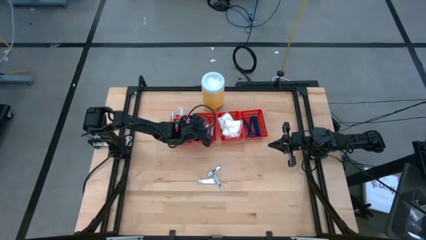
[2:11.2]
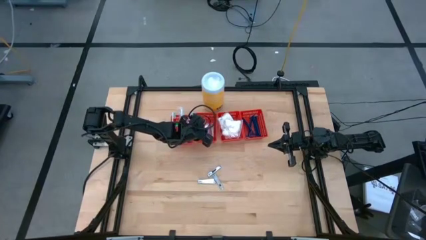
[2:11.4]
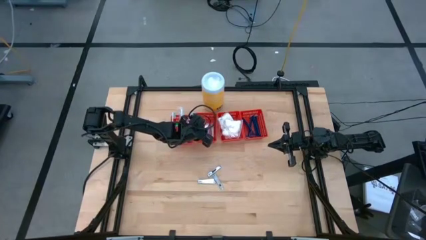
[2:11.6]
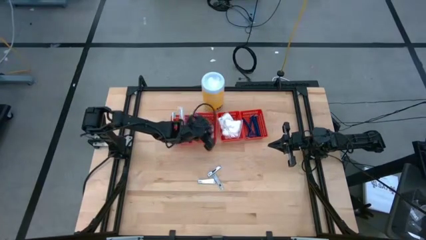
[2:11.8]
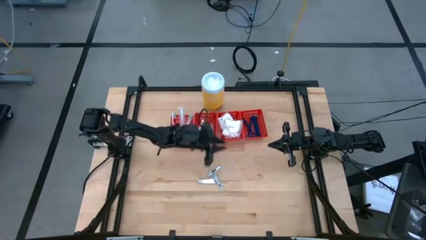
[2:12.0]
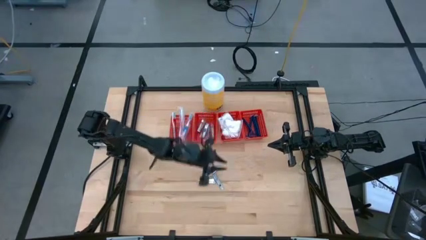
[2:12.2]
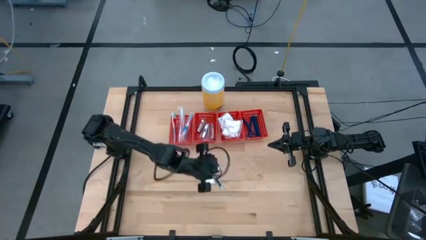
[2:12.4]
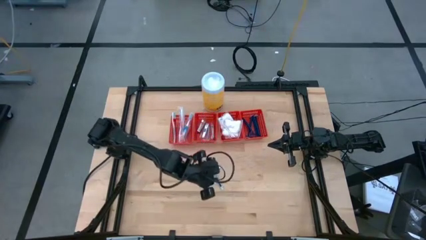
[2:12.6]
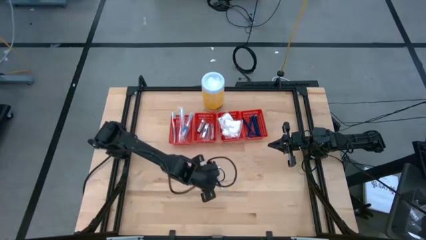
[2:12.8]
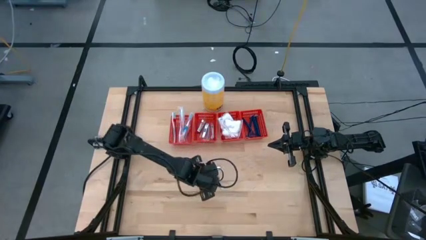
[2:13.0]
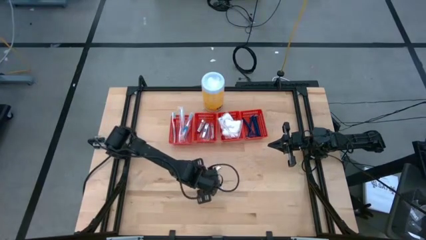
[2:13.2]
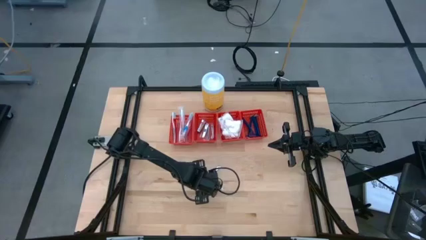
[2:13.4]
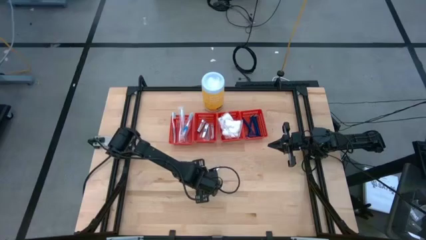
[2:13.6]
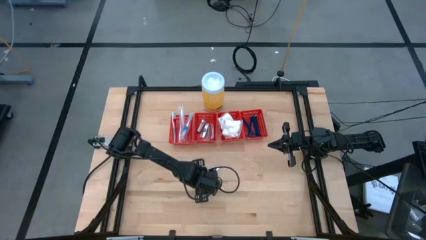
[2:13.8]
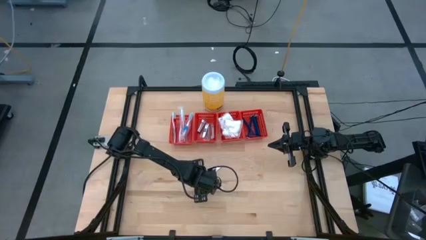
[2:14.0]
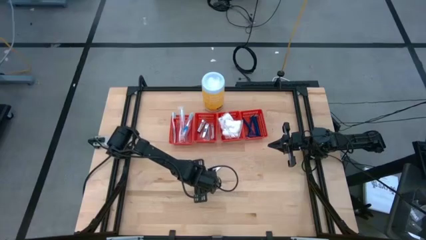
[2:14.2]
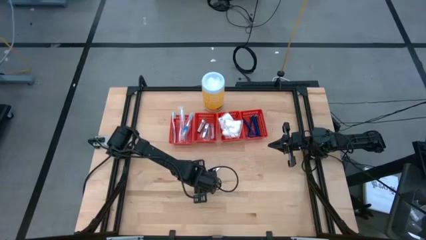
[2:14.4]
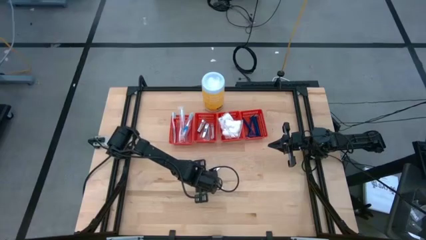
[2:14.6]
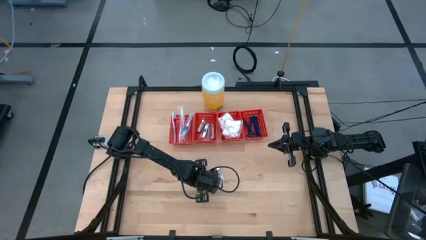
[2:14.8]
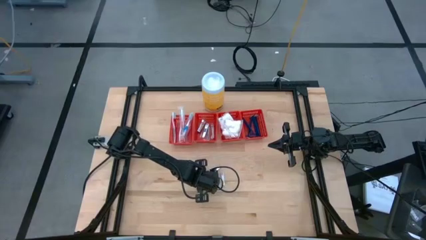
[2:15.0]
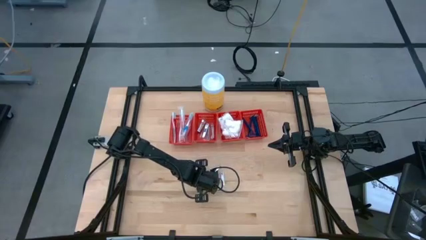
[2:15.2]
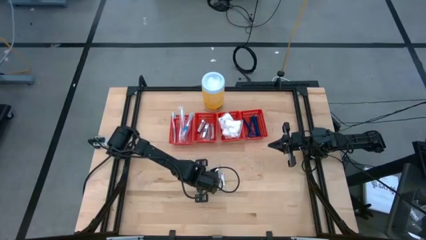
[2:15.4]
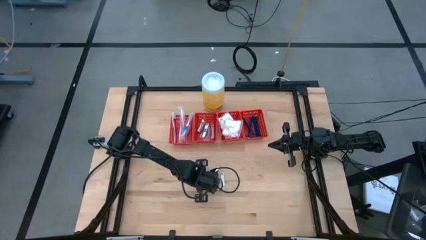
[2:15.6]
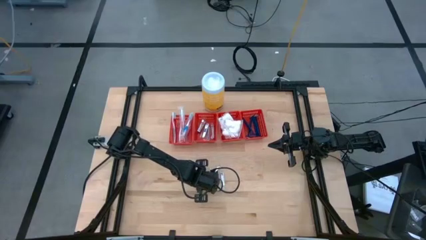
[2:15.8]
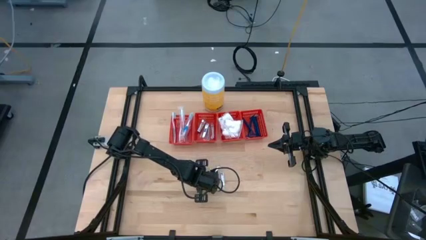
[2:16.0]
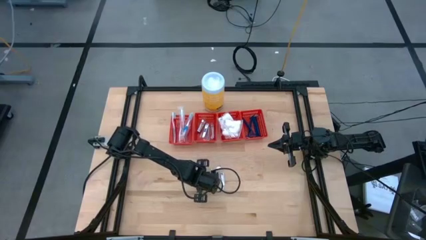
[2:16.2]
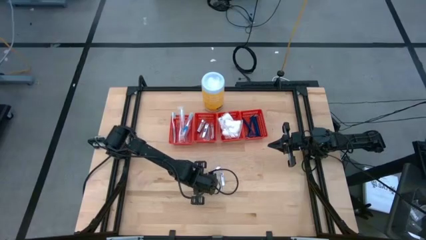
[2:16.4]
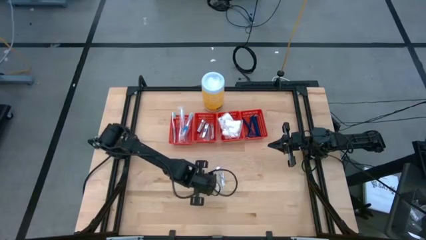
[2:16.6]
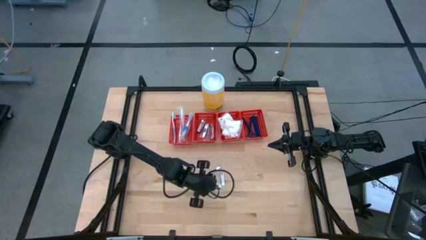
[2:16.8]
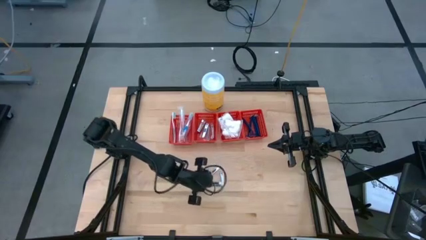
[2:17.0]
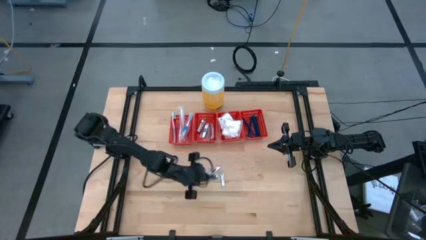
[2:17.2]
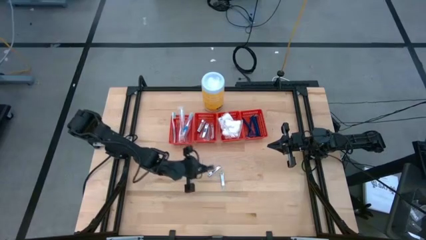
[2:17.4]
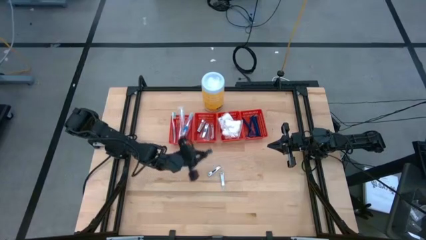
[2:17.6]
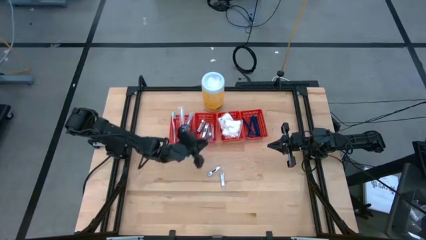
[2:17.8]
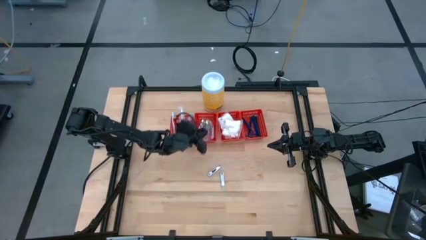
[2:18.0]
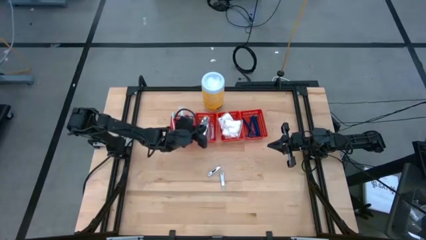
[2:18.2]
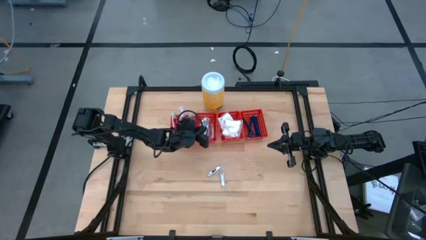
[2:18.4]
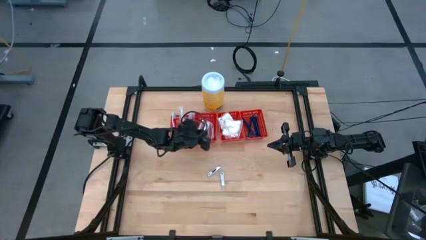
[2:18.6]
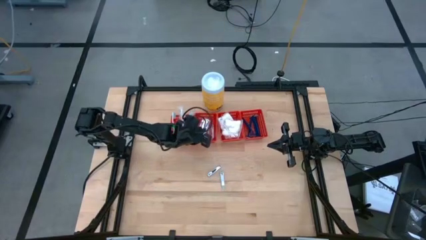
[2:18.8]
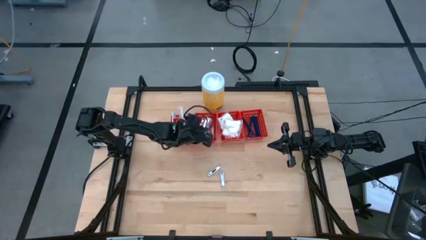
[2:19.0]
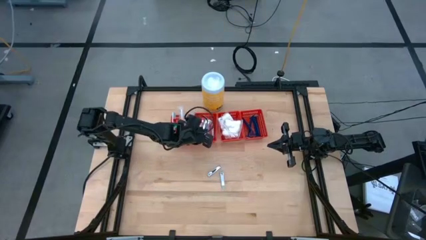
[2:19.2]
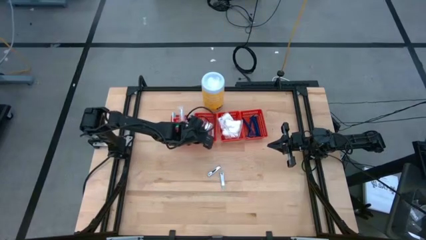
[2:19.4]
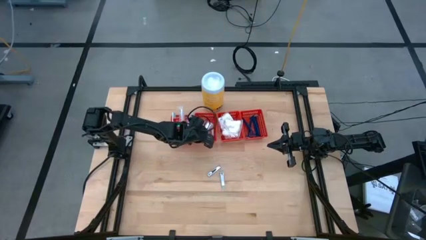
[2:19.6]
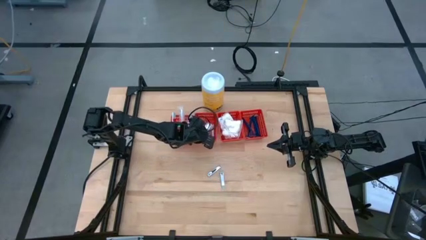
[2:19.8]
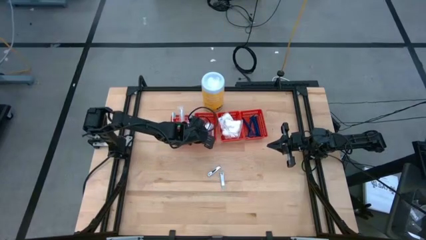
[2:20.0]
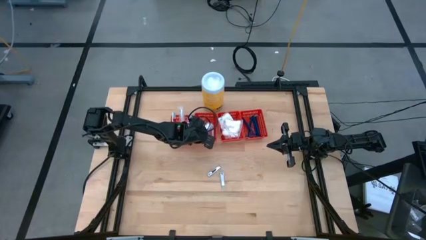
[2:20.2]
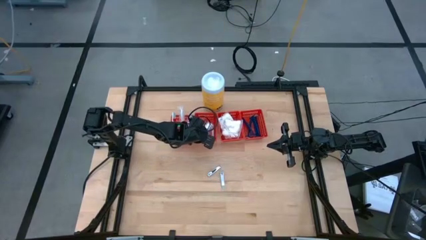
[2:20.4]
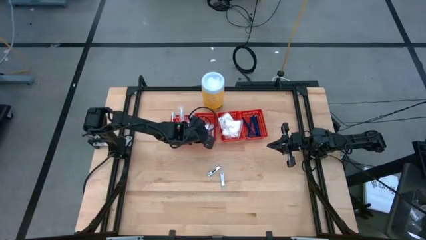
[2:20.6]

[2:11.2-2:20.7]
Task: Pick & Place Travel size toiletries
Put the silver nail clippers into the middle left red basket

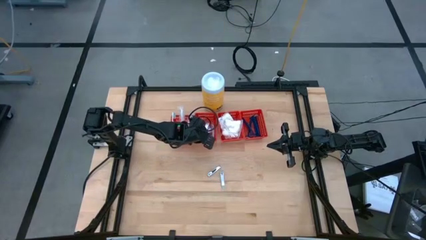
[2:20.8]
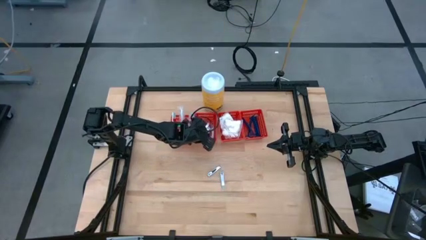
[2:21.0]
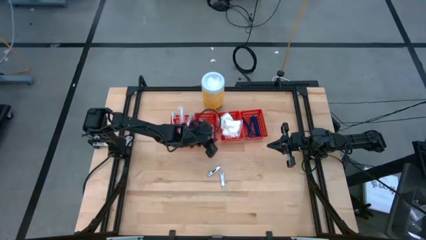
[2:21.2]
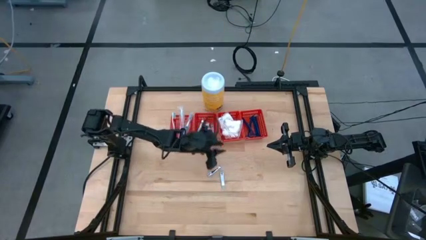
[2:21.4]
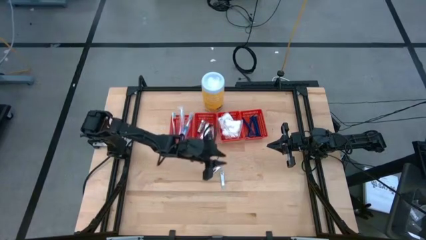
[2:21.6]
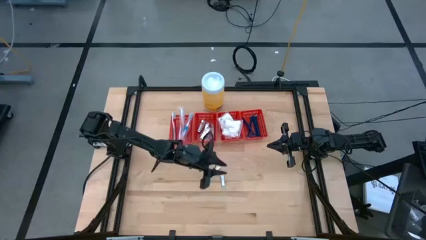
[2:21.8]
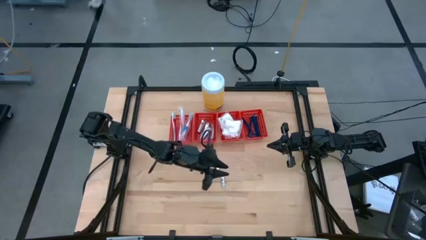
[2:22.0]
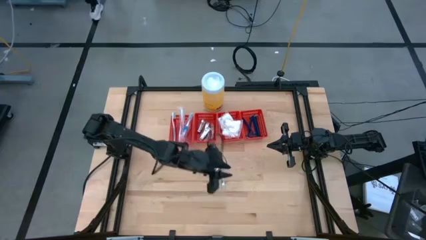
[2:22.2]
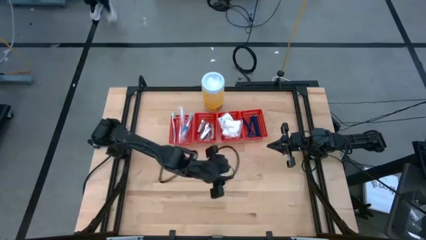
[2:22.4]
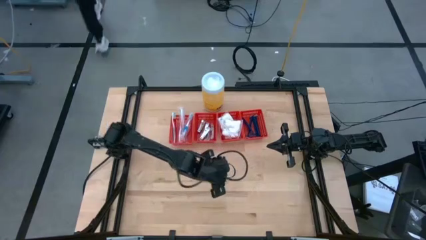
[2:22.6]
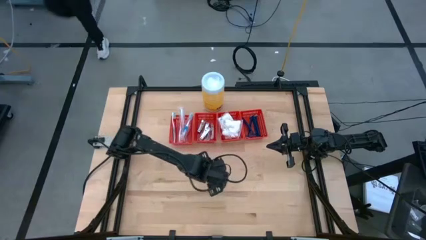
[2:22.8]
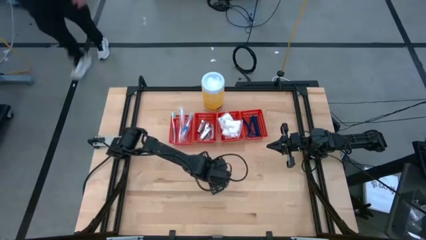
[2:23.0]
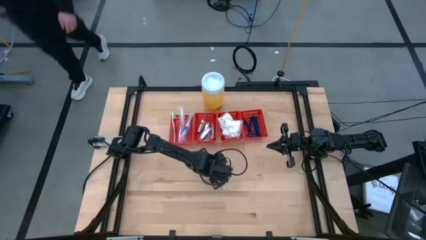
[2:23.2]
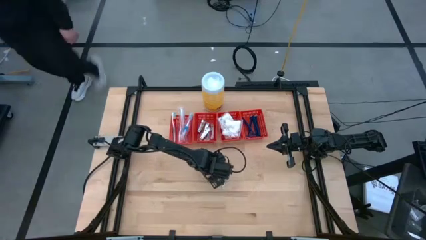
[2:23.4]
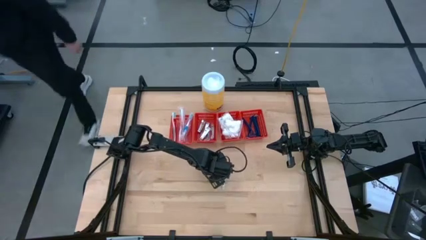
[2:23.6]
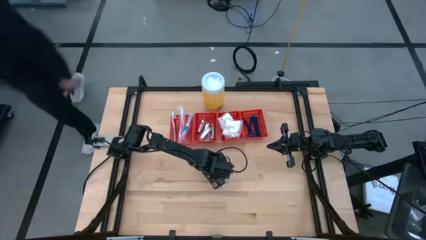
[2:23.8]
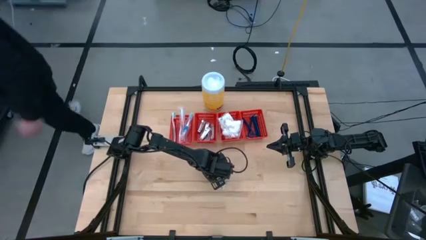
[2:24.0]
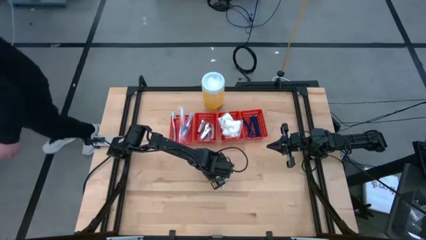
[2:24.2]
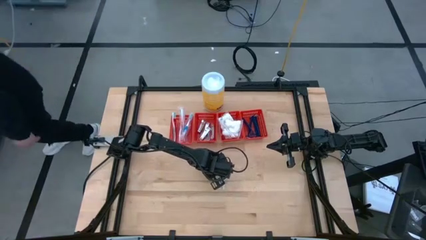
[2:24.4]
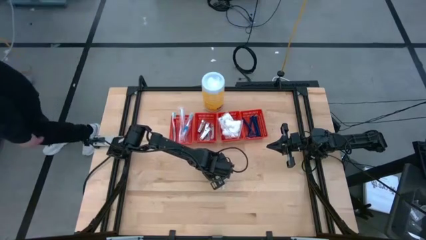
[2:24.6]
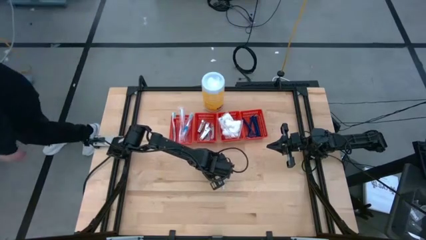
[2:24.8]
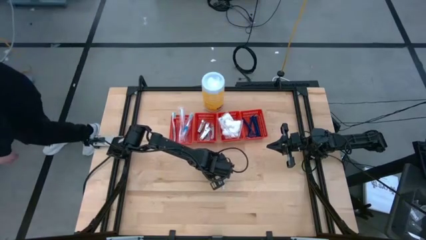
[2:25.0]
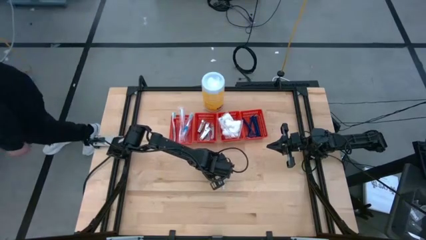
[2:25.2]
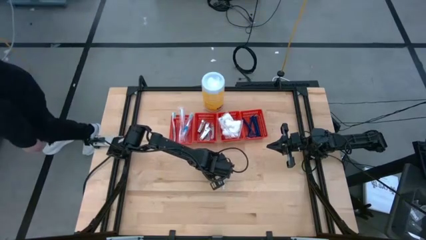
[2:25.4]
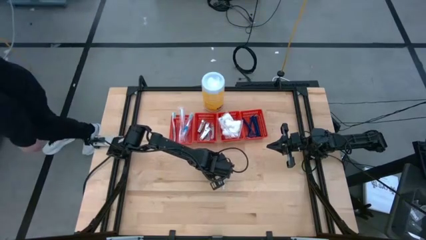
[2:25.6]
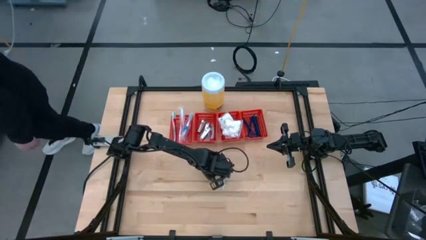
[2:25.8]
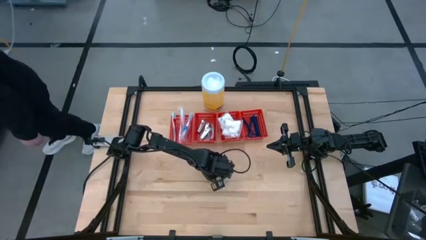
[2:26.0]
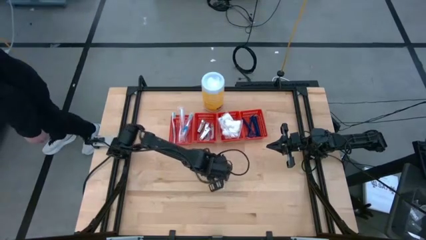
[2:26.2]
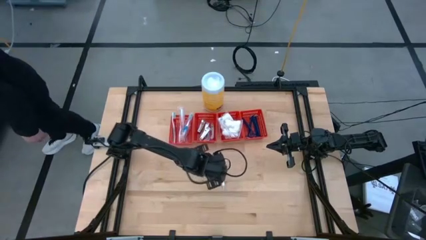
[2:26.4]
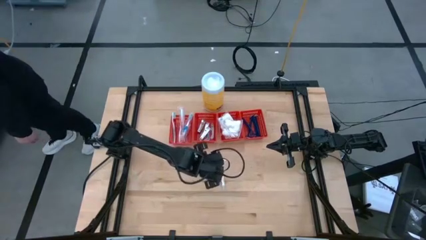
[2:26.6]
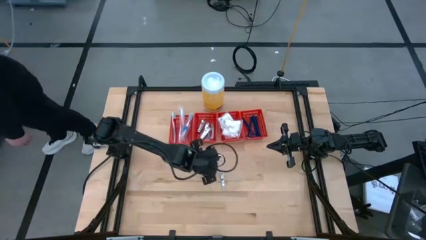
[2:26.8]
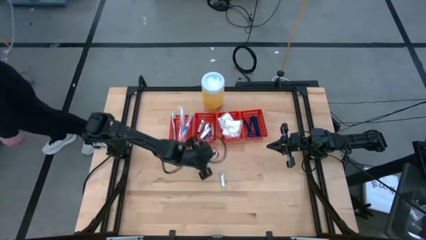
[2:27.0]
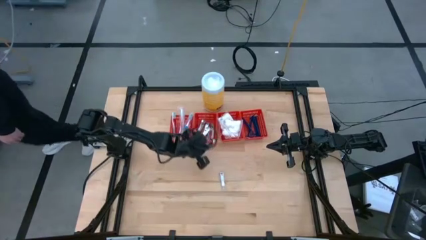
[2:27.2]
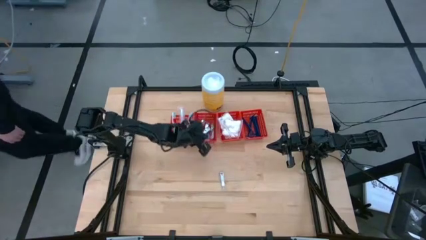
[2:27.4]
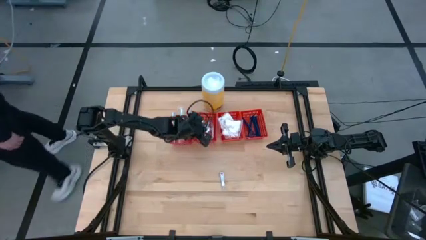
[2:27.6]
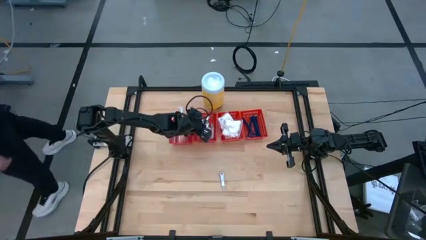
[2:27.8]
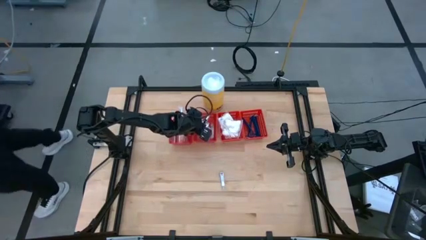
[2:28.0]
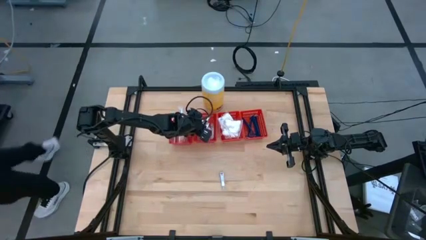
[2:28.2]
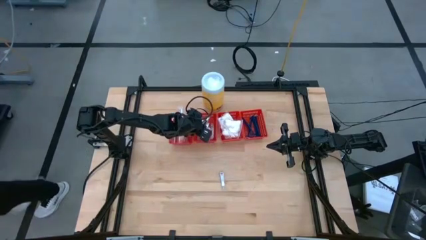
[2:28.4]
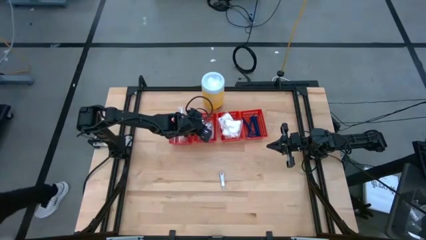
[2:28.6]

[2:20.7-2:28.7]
Put the silver nail clippers into the middle left red basket
